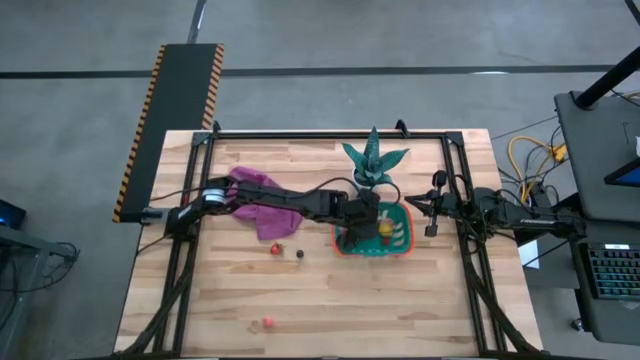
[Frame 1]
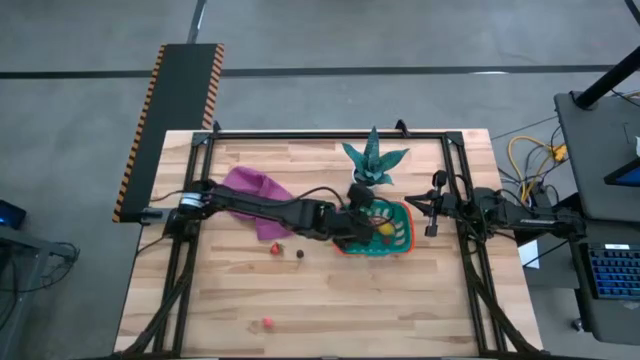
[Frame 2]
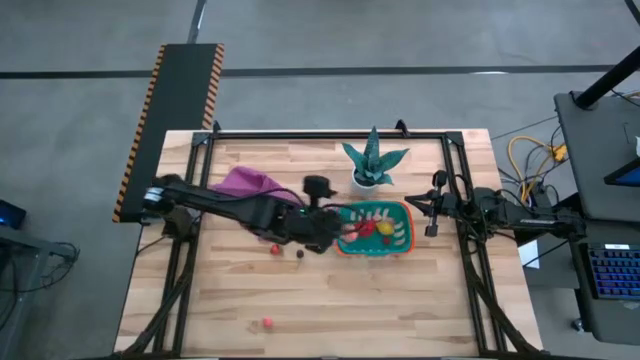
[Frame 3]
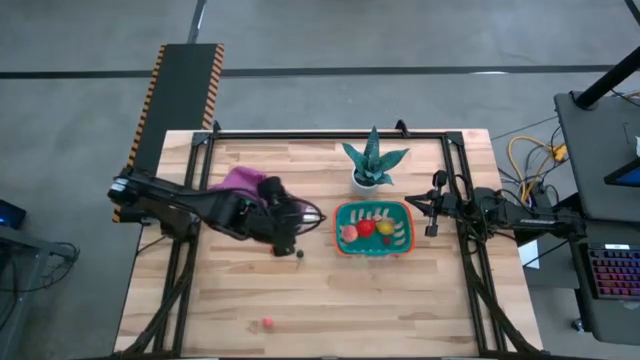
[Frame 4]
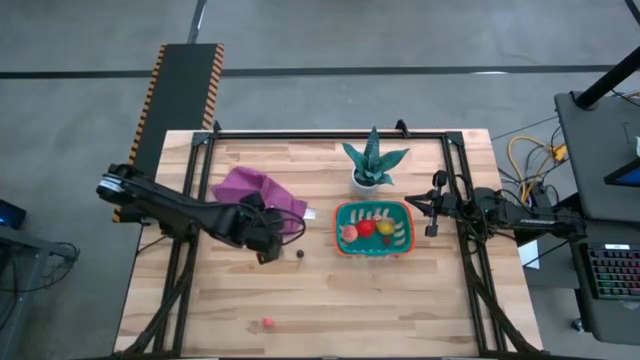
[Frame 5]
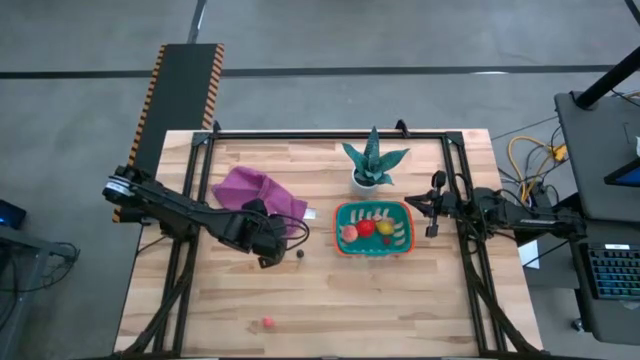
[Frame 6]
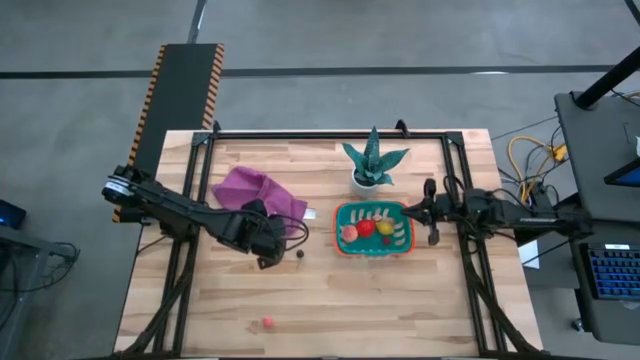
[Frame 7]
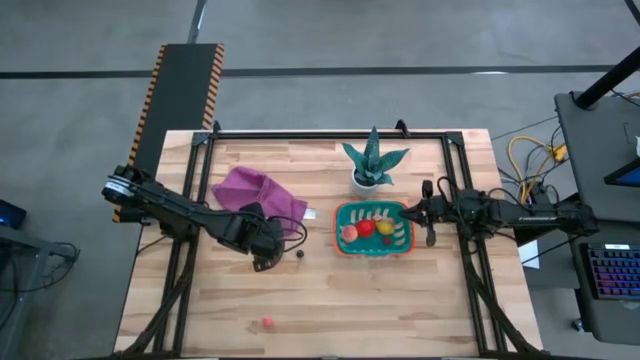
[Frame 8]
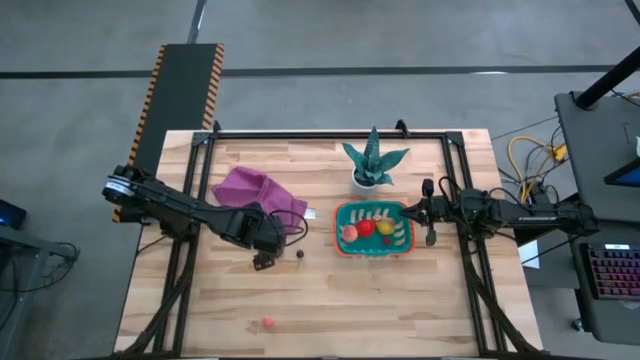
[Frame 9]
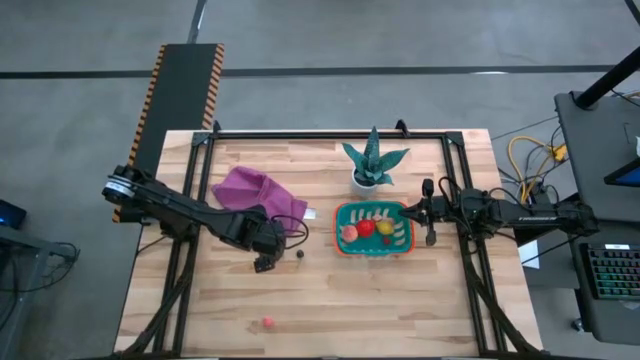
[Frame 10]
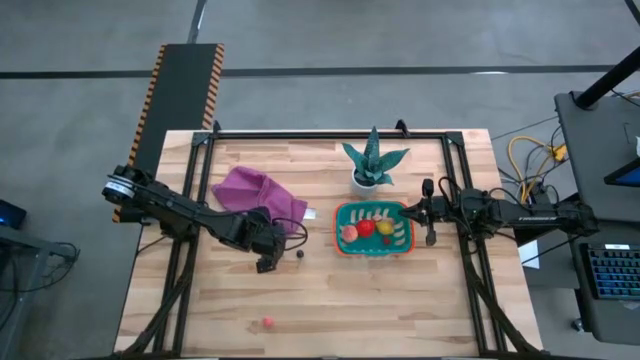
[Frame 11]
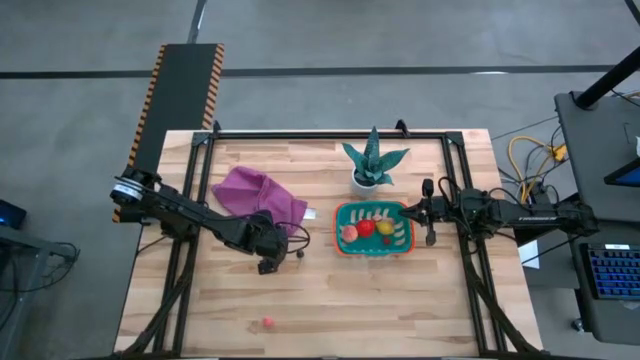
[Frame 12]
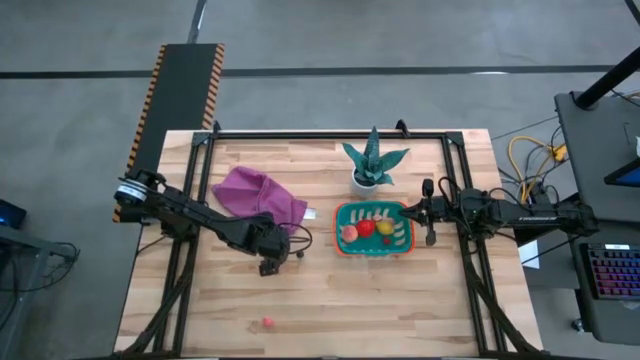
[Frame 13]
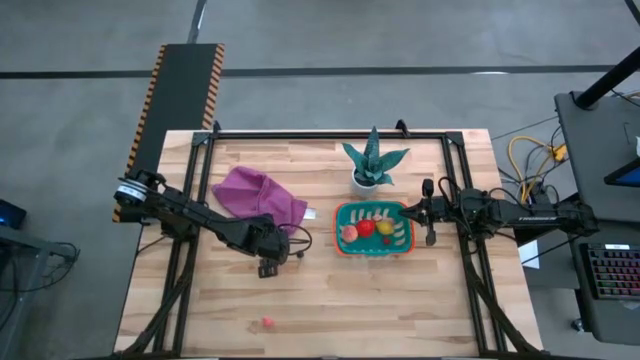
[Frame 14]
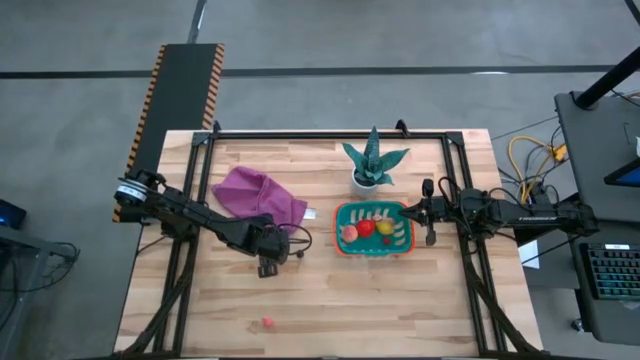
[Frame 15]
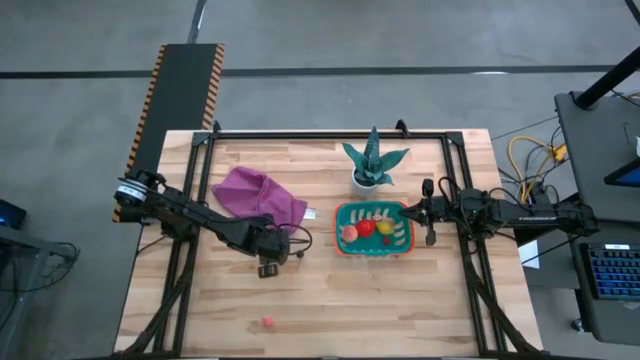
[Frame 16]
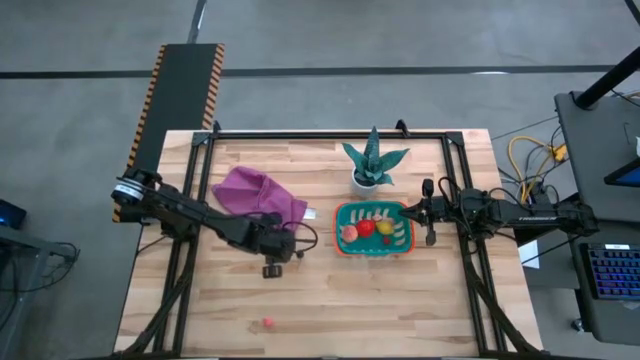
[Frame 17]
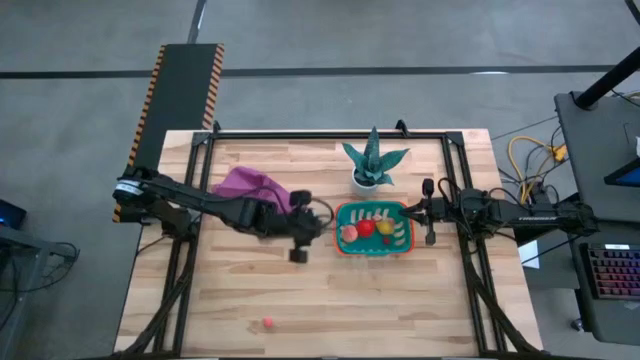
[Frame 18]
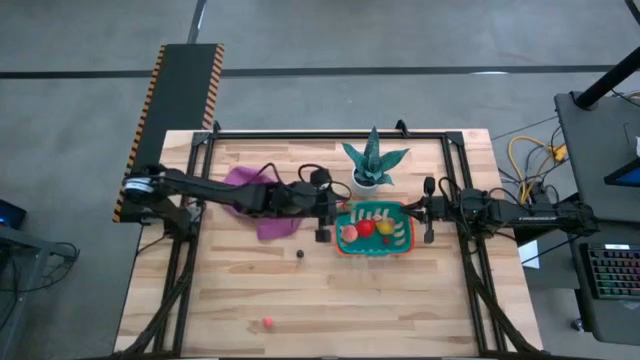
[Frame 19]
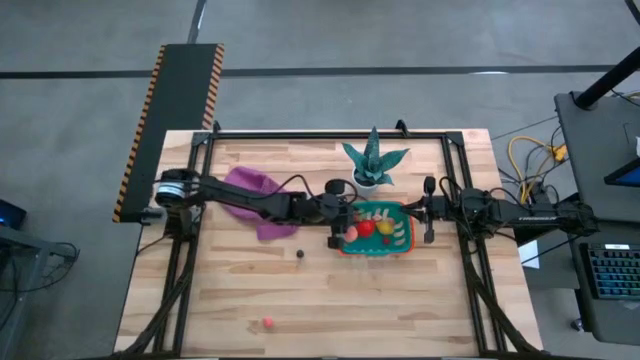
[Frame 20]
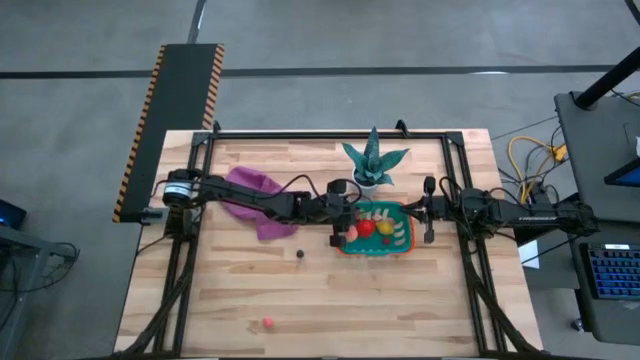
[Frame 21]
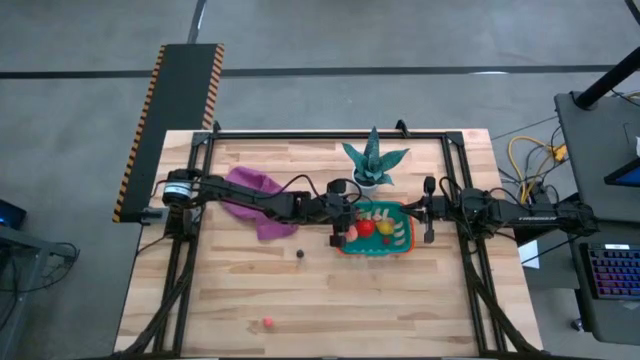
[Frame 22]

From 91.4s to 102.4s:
Task: Pick and placing Produce into tupperware
Put the strawberry into the green basket

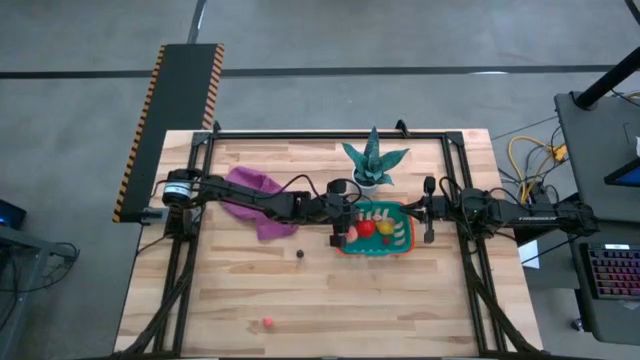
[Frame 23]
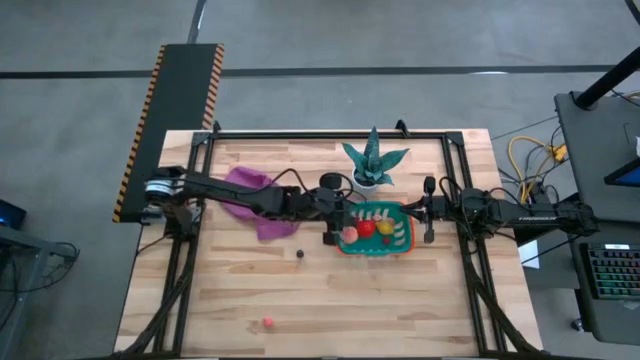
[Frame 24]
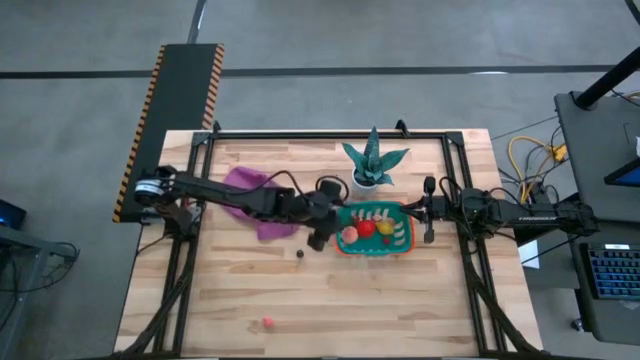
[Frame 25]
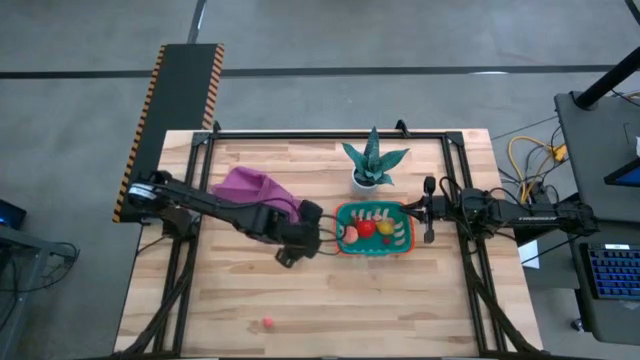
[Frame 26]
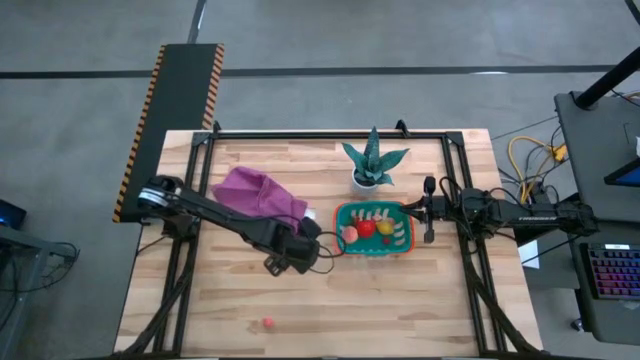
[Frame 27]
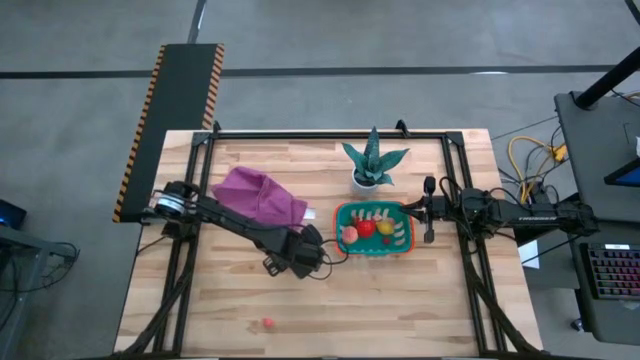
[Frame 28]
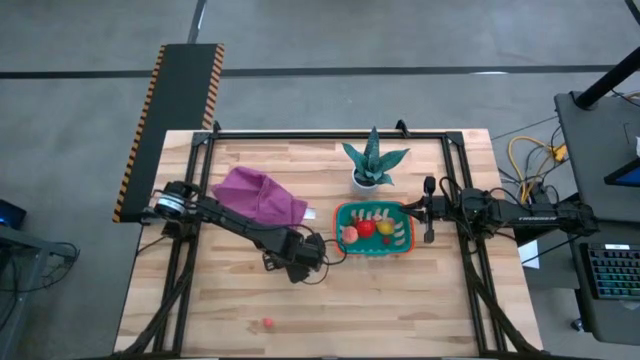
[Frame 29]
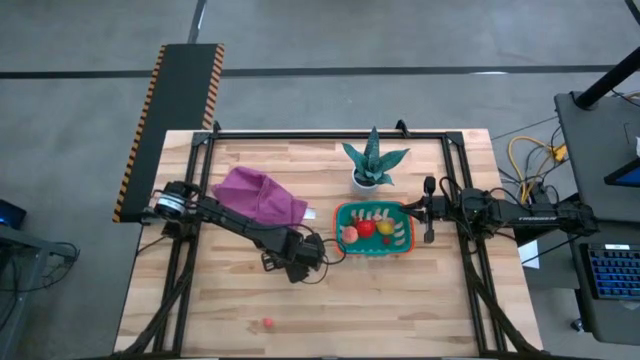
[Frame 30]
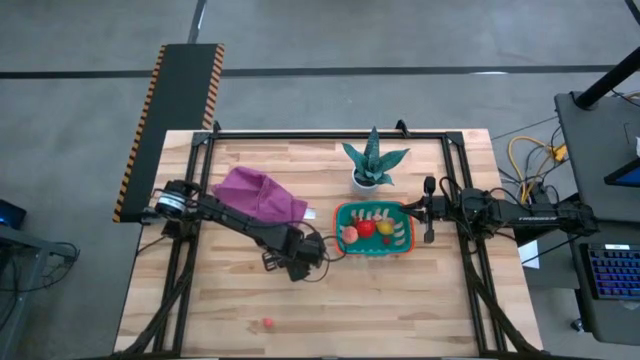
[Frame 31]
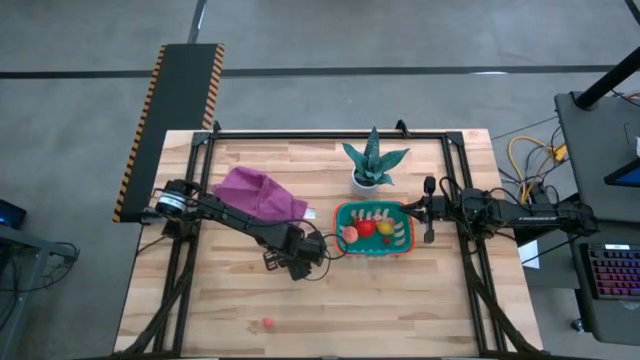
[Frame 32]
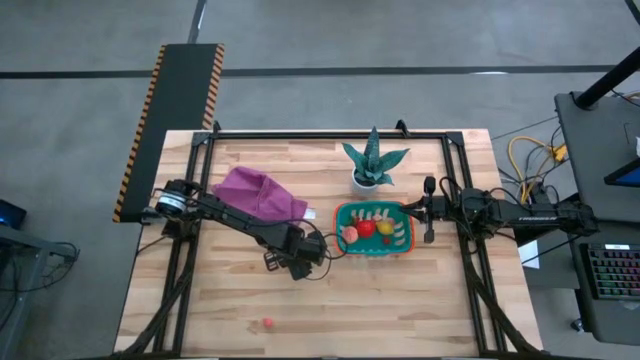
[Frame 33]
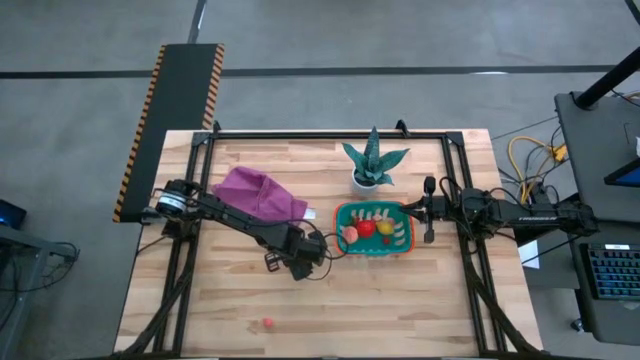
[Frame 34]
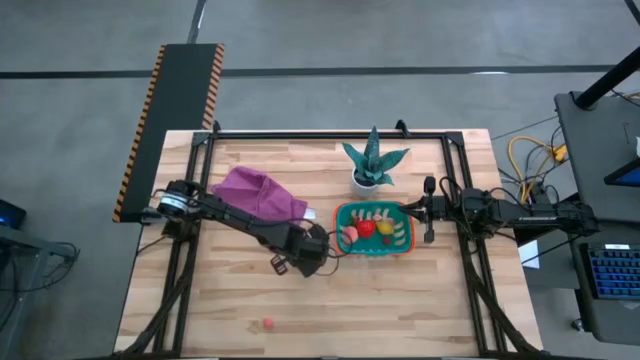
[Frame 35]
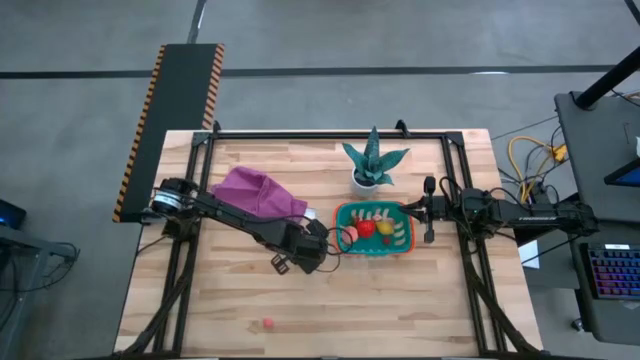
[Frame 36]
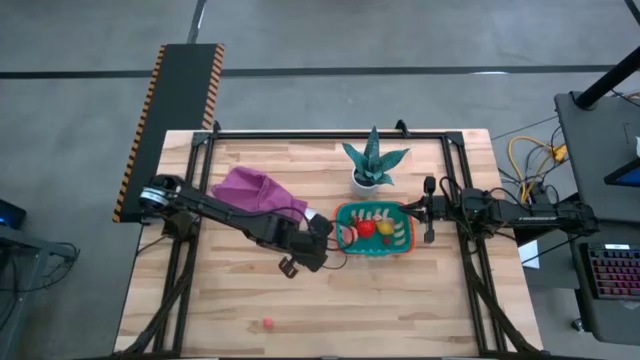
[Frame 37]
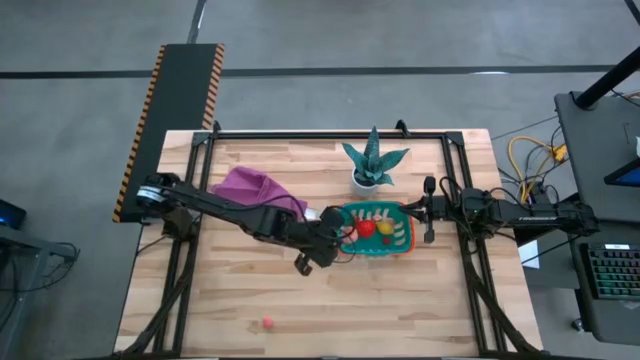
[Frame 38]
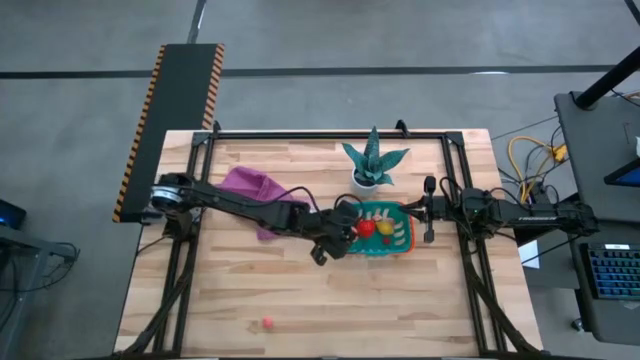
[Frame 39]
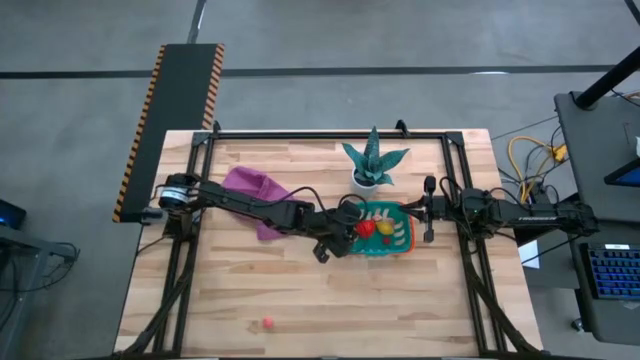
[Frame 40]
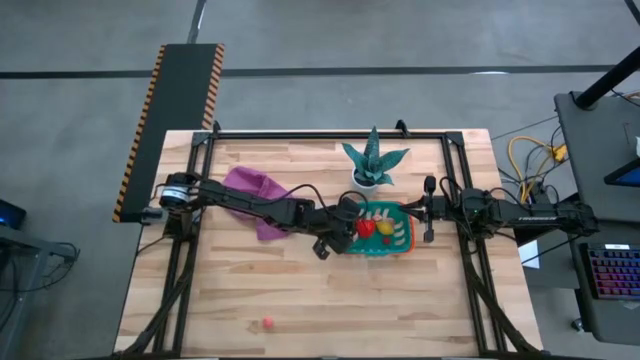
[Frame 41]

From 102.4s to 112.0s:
Put the cherry into the green basket
